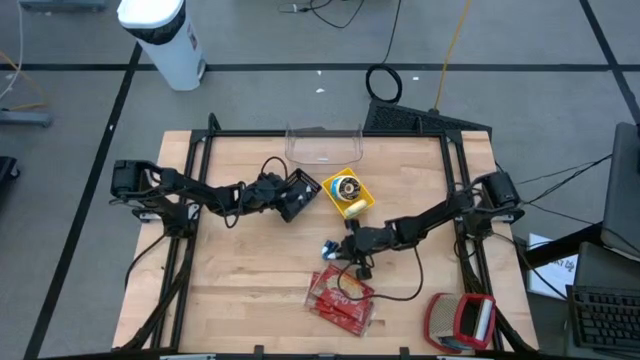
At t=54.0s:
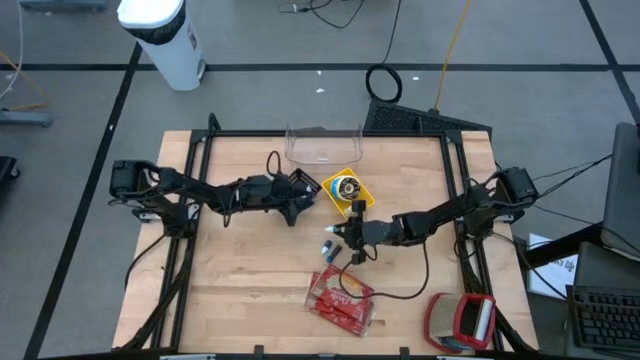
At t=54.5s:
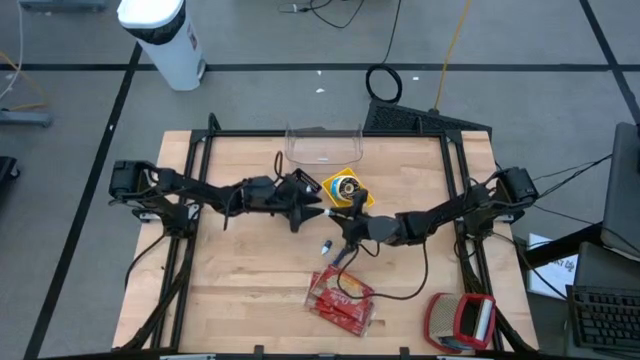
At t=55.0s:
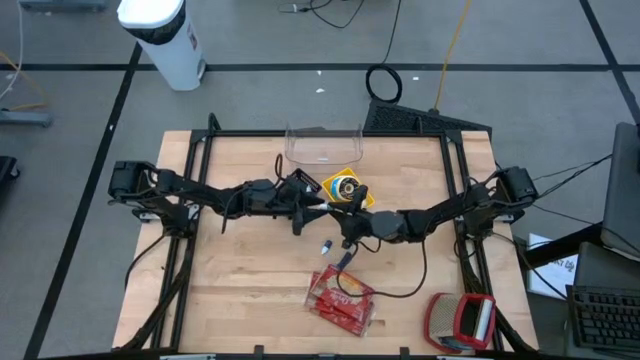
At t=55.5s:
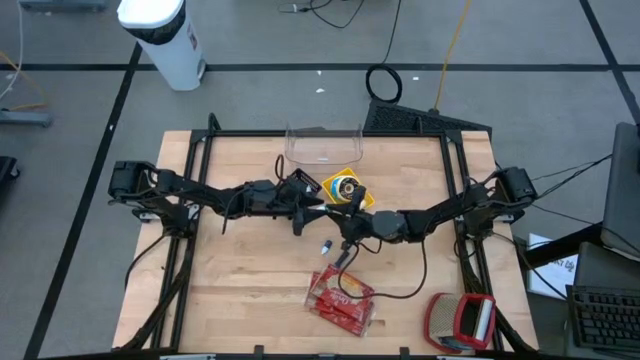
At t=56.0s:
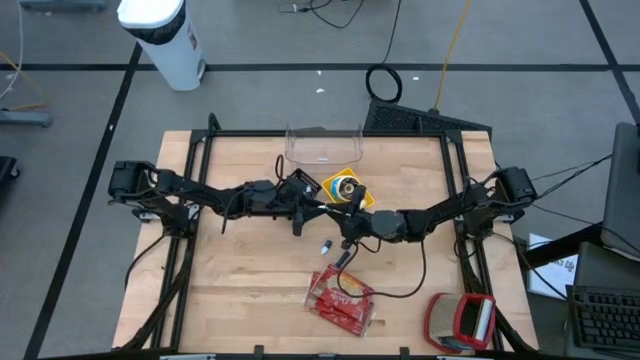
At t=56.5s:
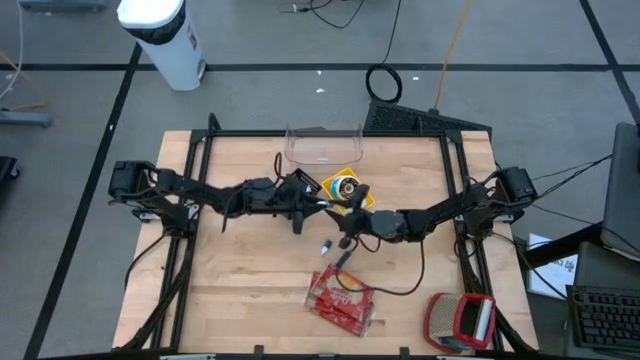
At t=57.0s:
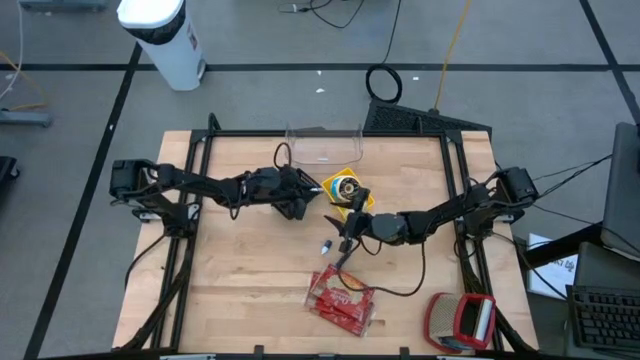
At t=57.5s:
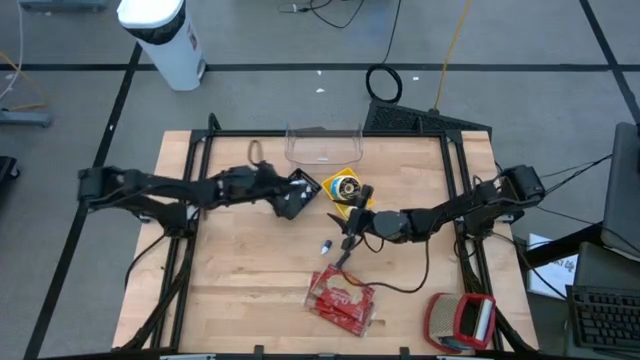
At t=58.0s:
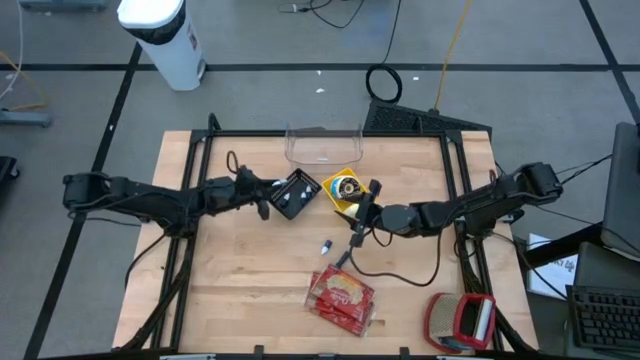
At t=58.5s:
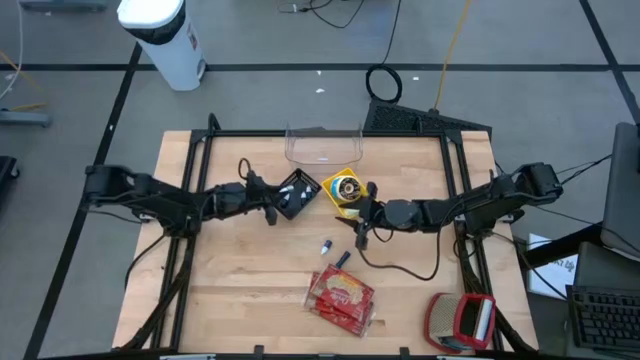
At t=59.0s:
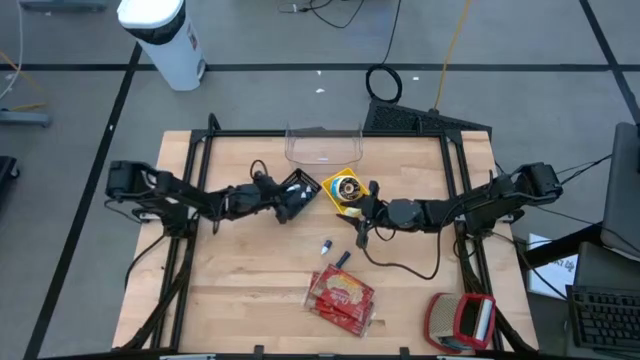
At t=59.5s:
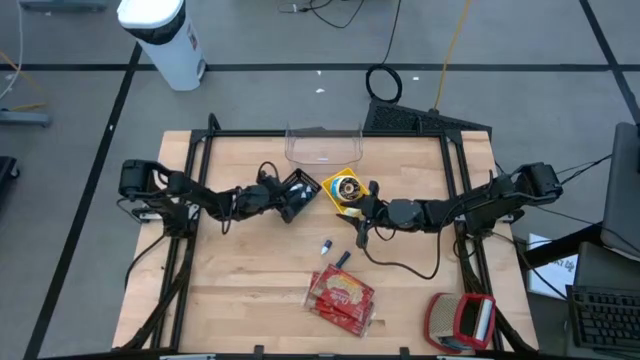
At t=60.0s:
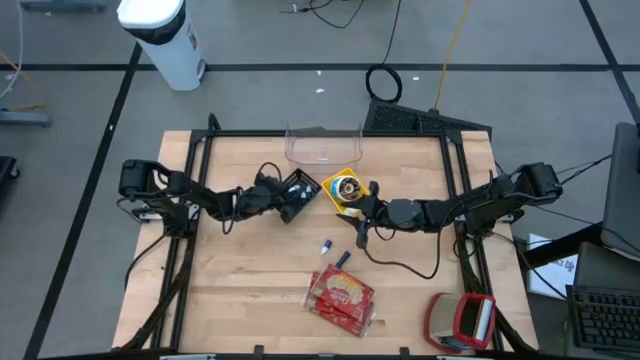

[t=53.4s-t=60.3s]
Put the green bottle into the black bin

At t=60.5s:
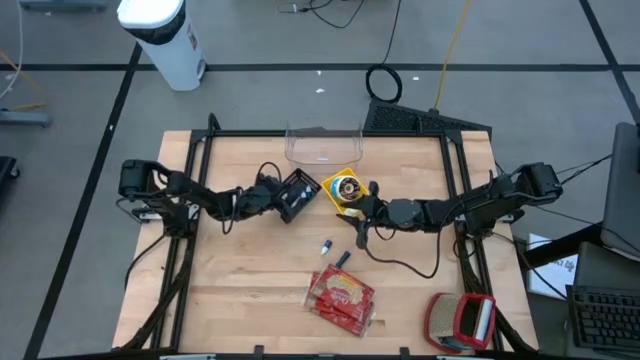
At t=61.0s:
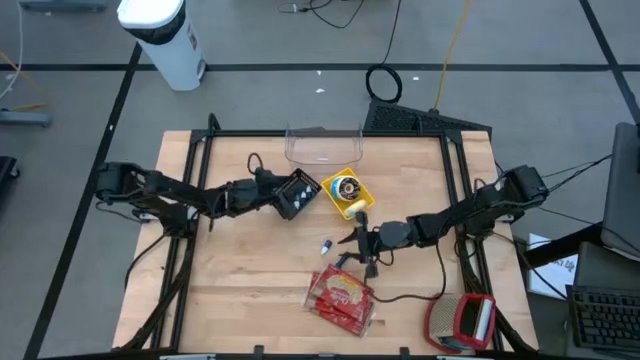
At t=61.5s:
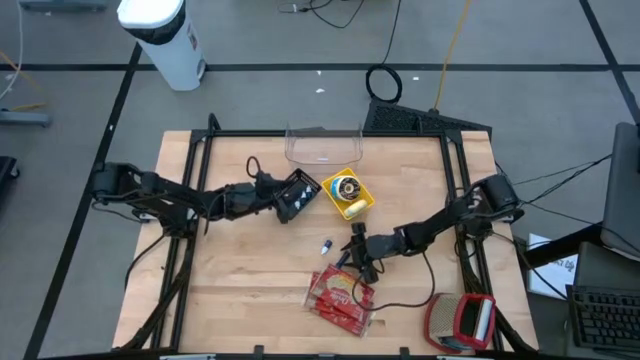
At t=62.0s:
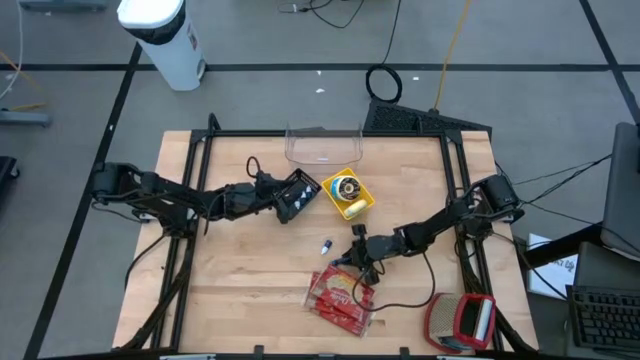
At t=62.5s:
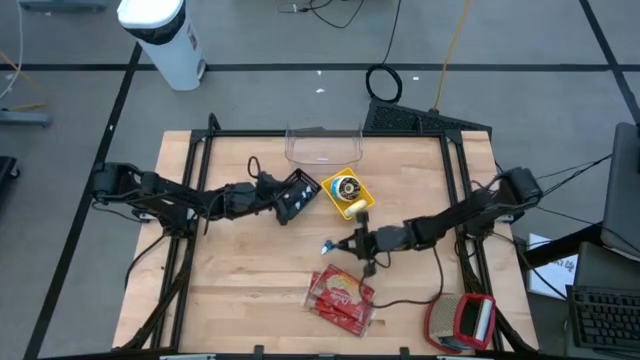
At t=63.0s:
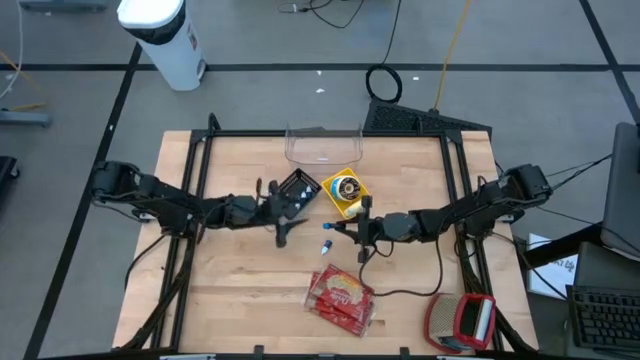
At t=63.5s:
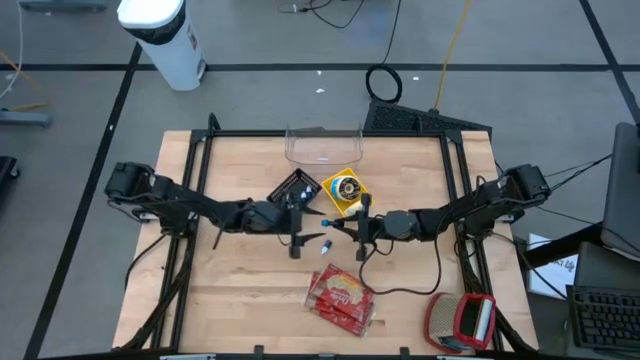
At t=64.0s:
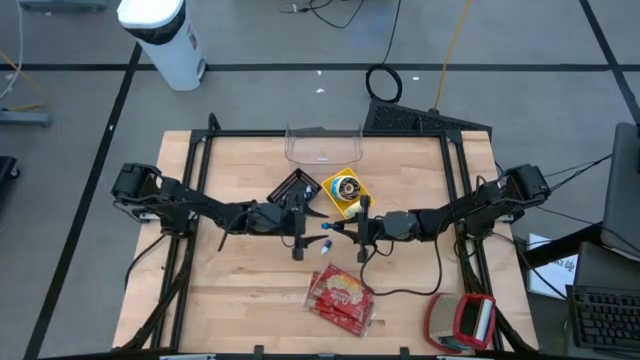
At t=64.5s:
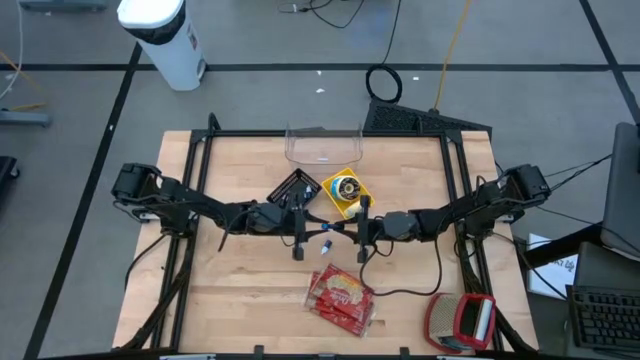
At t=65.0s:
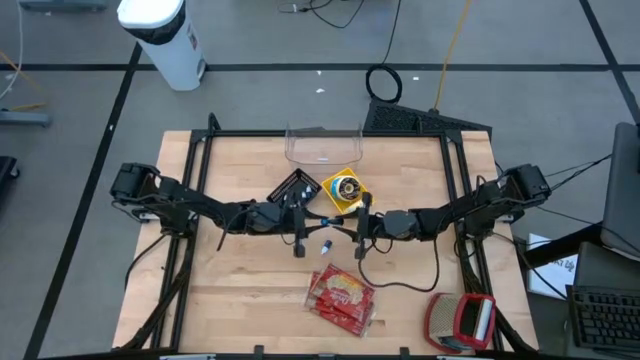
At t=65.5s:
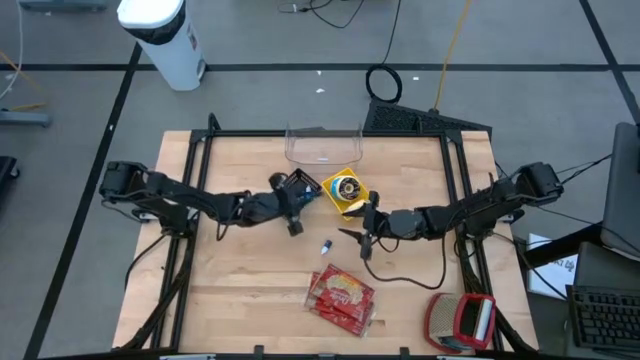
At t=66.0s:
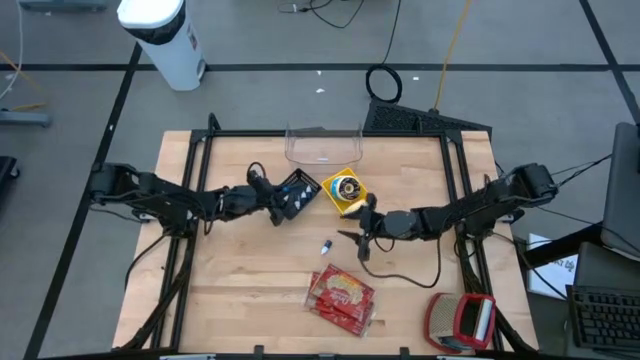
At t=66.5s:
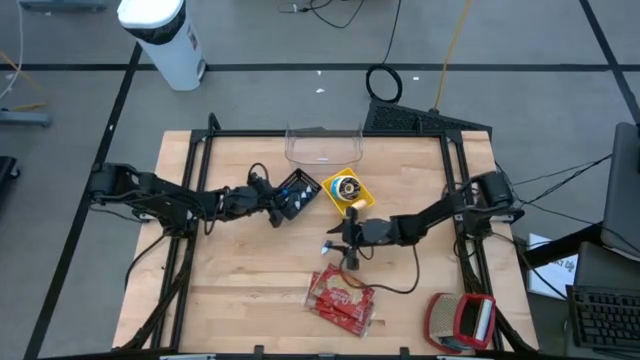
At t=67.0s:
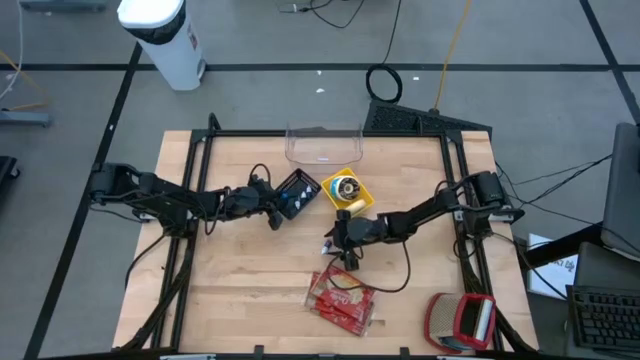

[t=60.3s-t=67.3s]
Put the large blue bottle into the black bin

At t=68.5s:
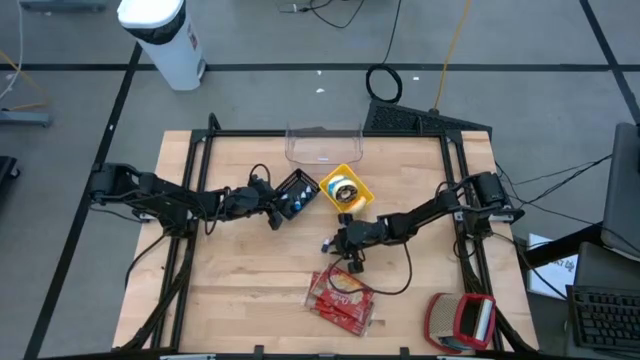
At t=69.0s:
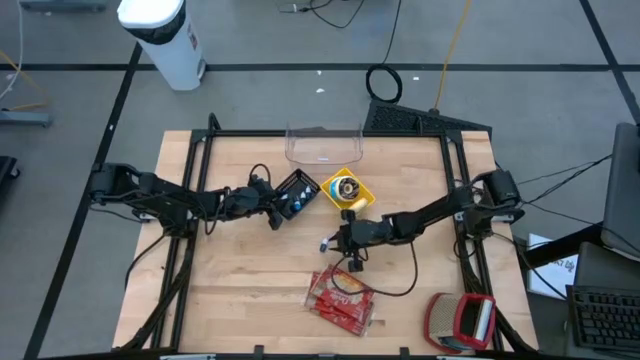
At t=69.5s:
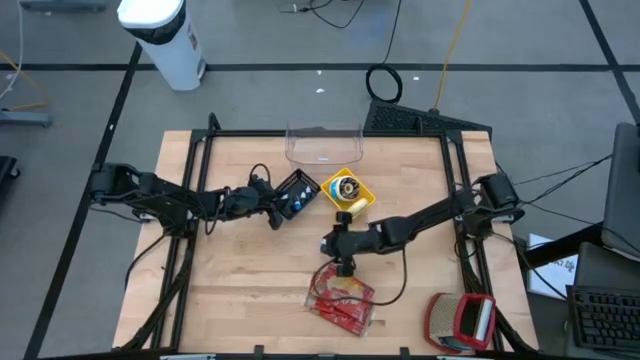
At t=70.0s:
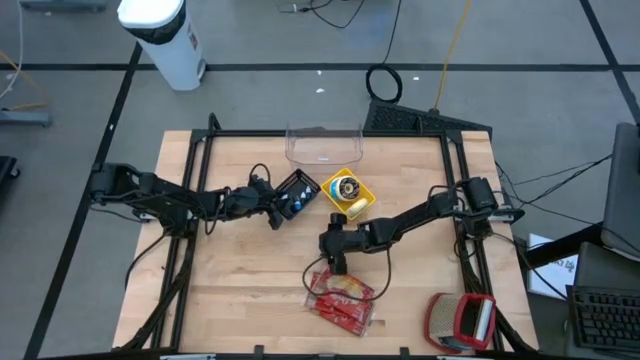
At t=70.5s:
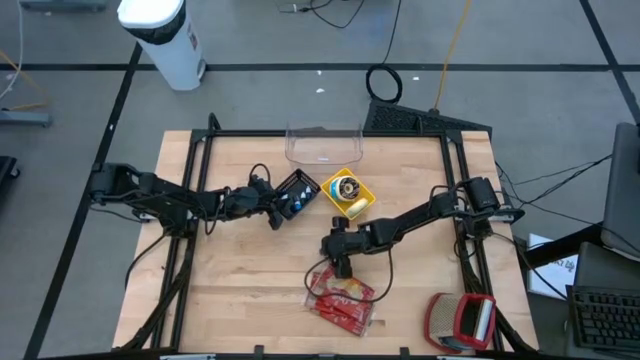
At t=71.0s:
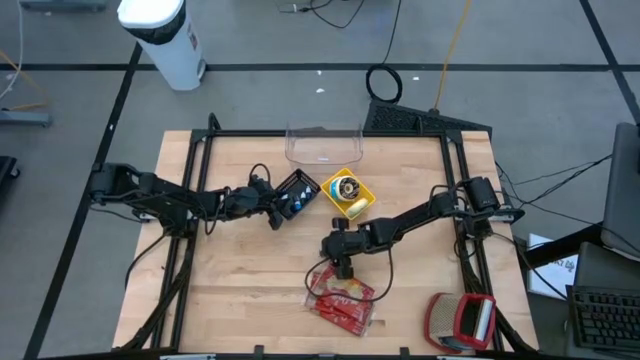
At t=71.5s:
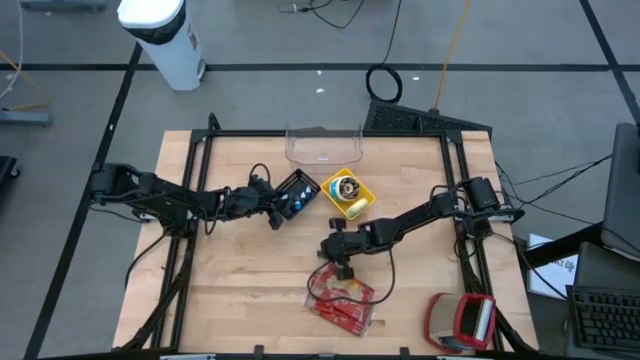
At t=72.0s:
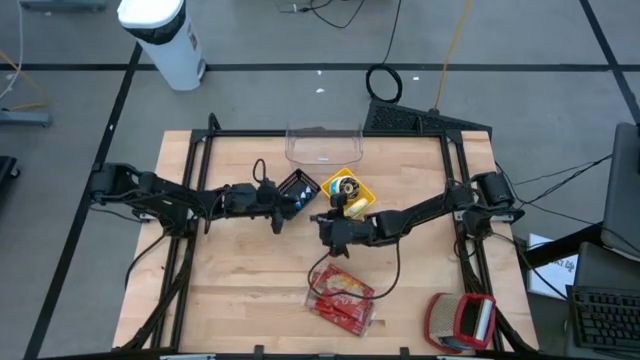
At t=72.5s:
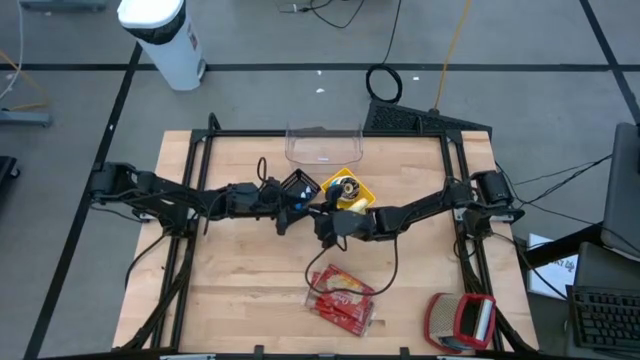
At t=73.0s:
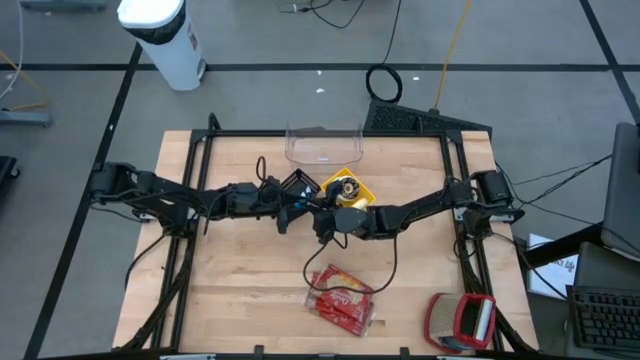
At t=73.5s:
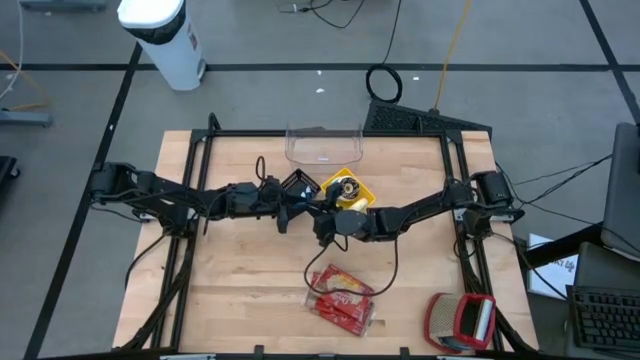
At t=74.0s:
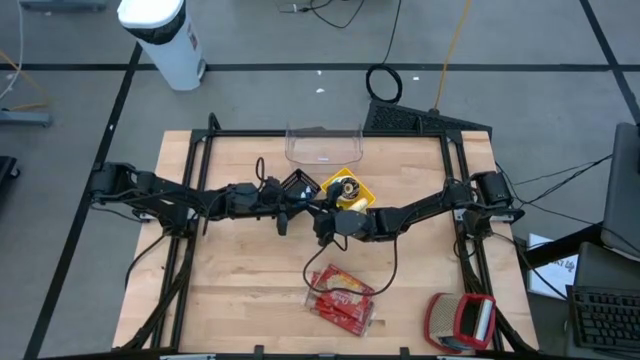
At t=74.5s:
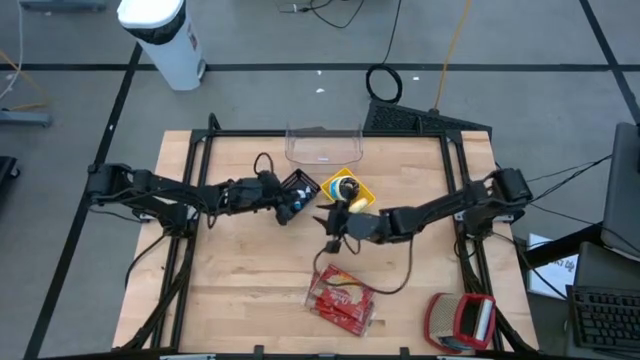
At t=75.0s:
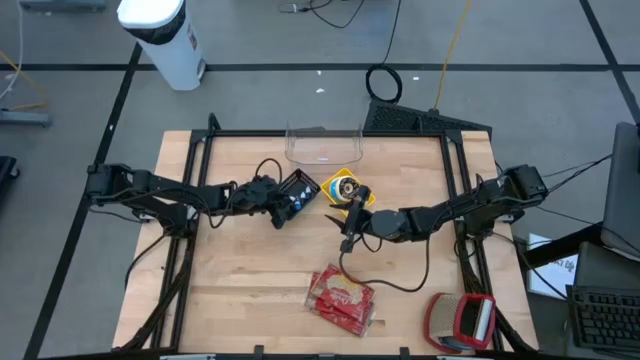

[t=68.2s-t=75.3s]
Put the blue bottle into the black bin
